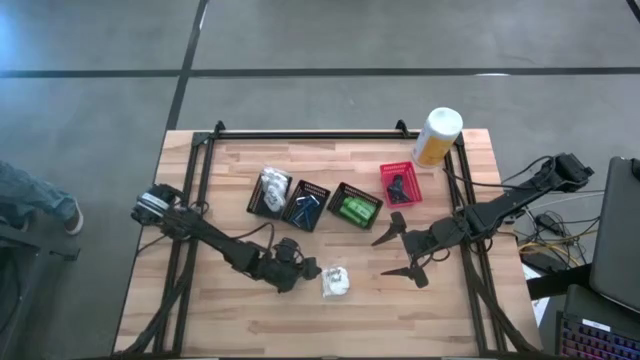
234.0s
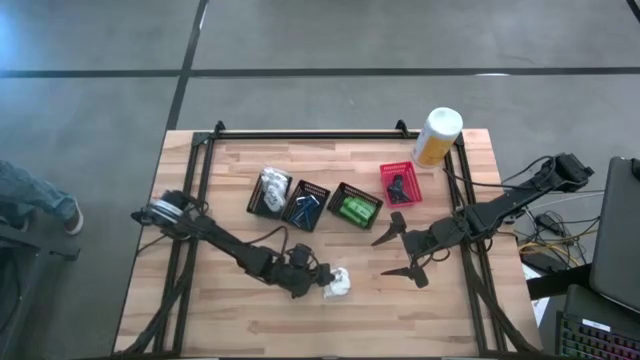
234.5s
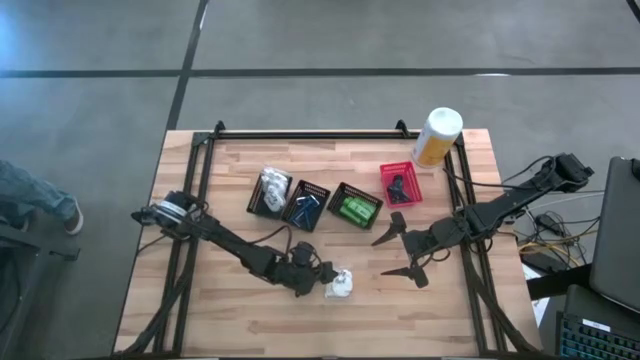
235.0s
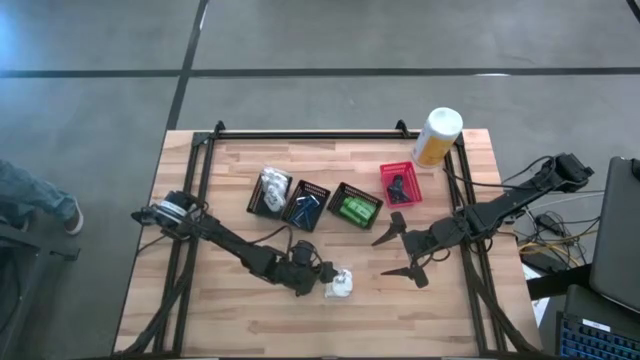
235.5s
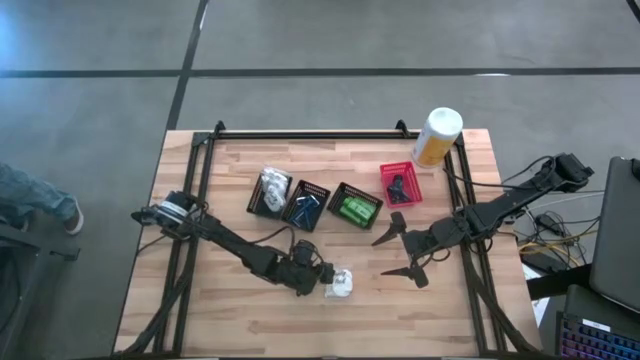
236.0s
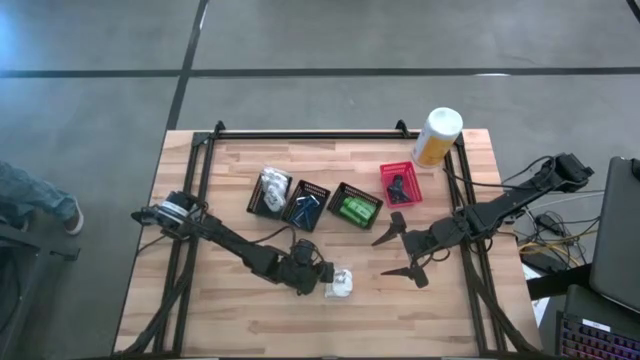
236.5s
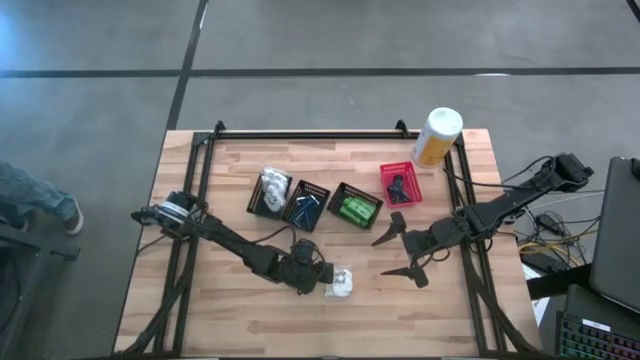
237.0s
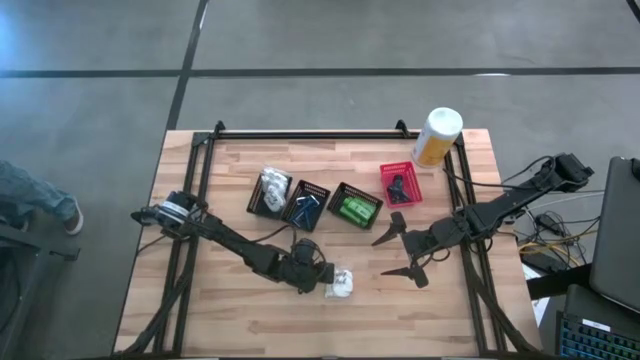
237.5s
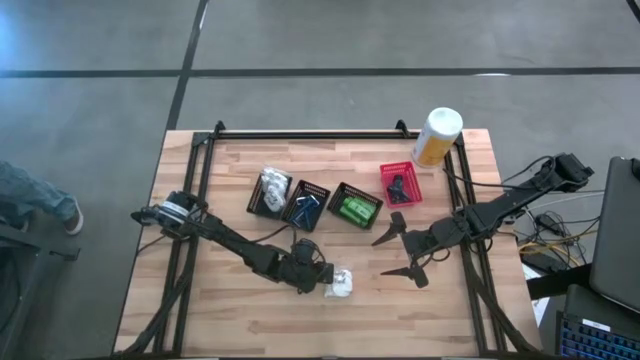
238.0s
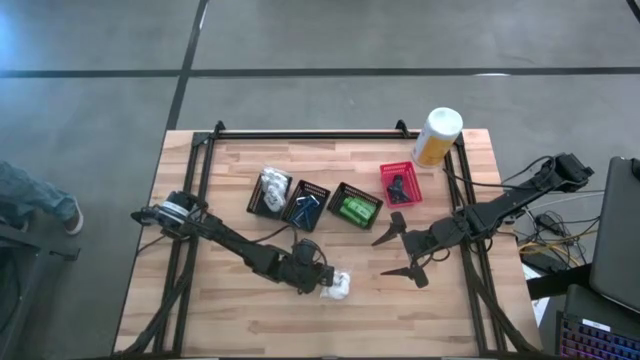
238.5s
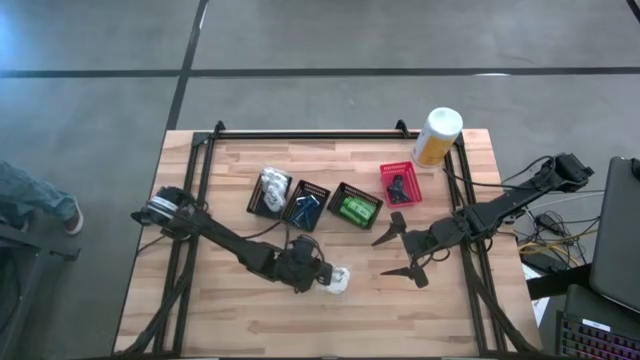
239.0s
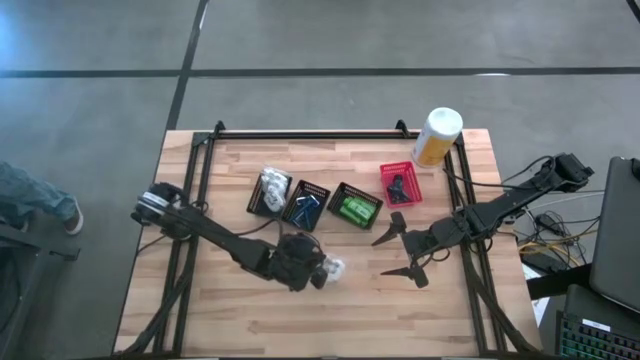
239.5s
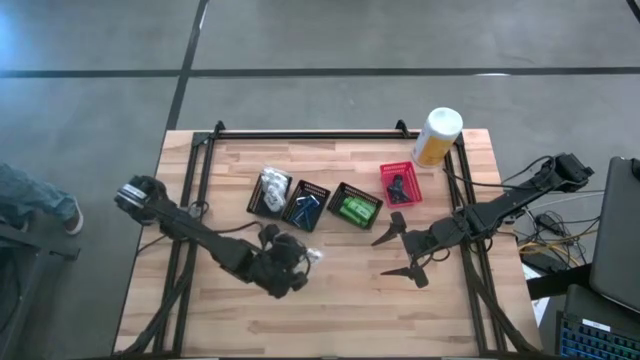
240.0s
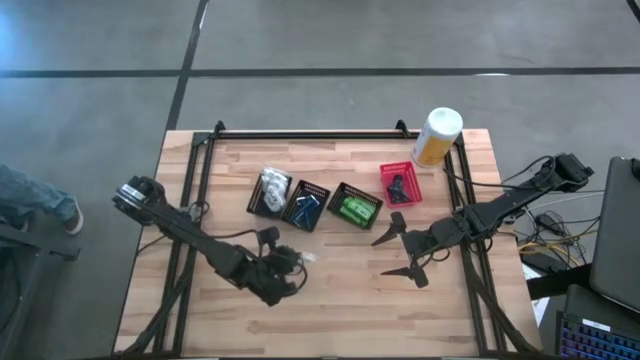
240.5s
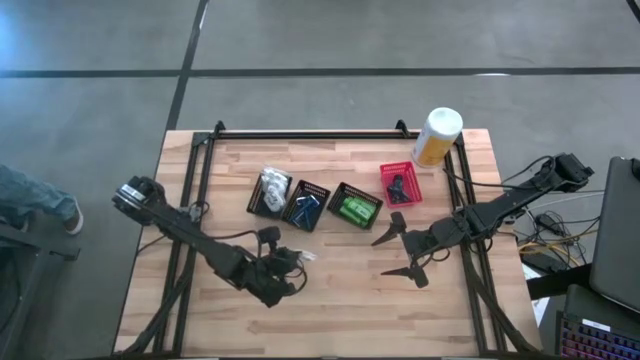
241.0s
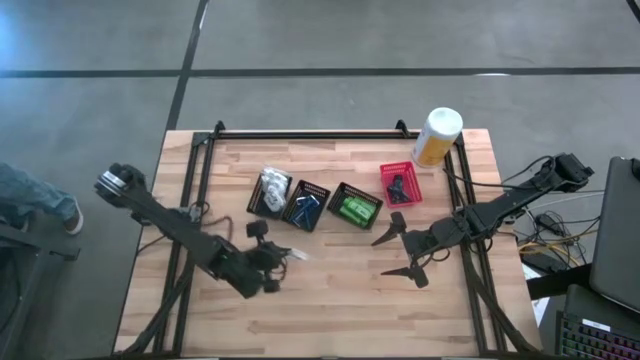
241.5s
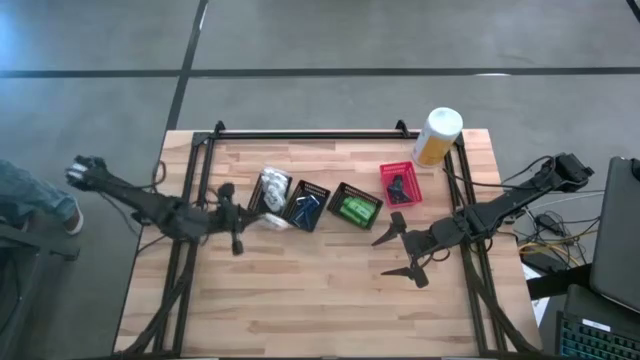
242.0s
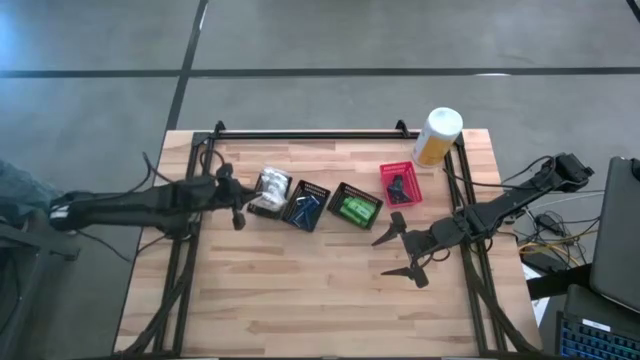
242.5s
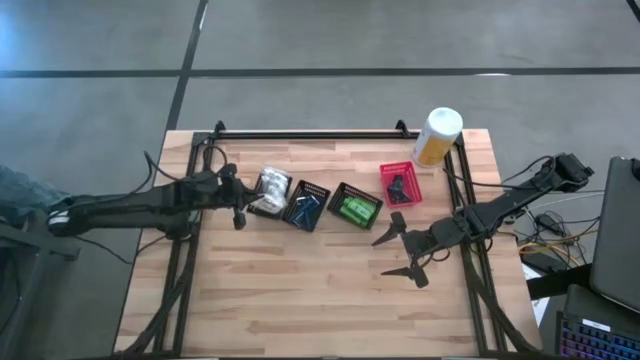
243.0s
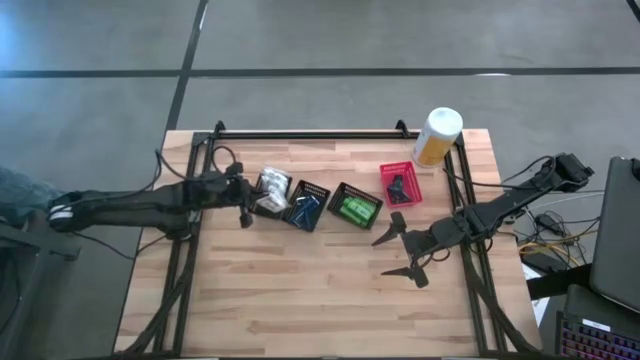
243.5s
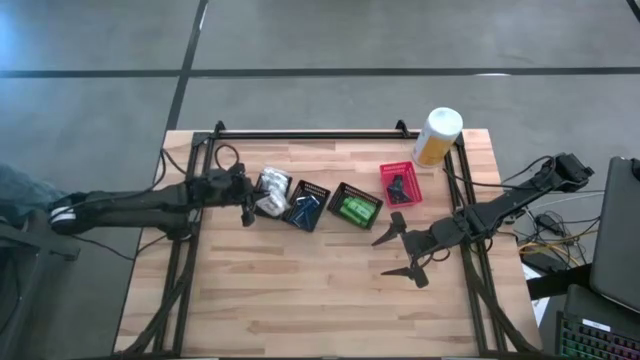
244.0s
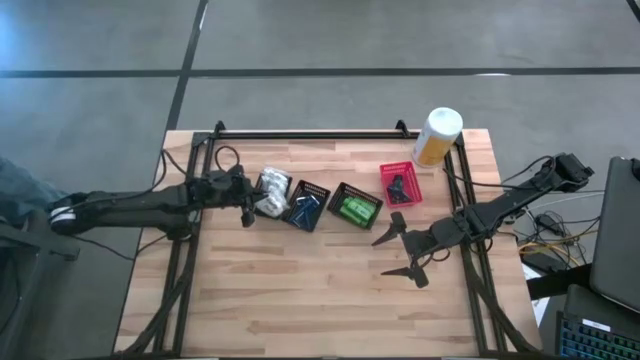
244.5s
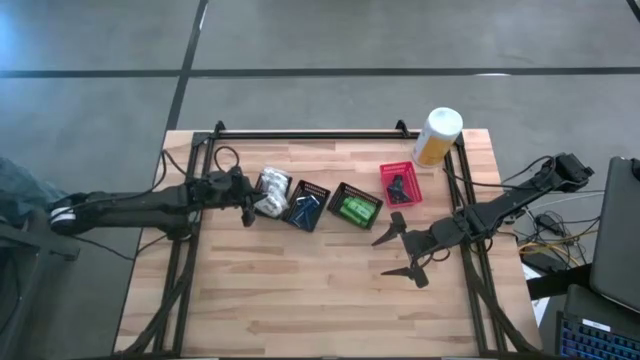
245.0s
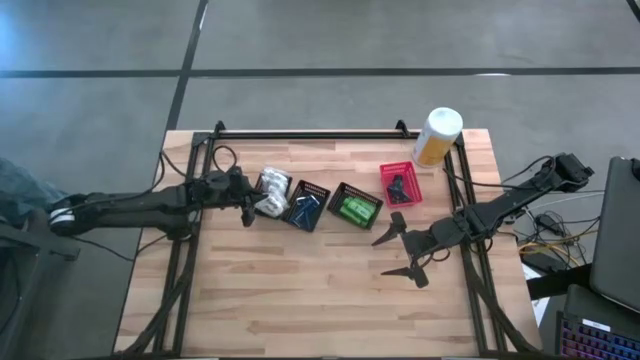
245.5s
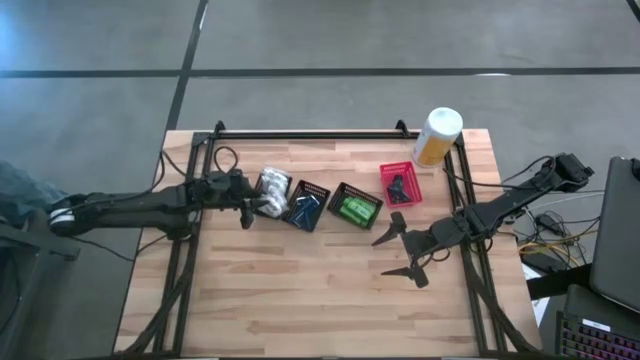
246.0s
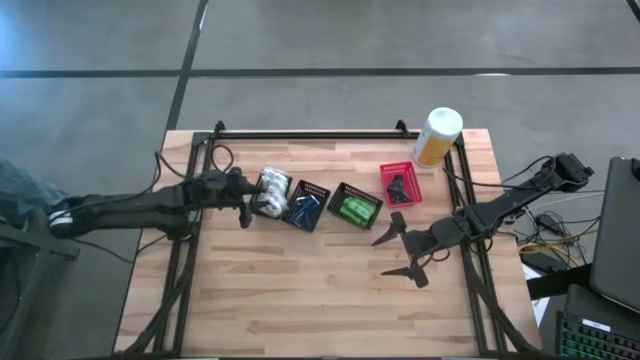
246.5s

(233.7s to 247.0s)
Task: Pick & Place Travel size toiletries
Put the vanity pack into the left black bin

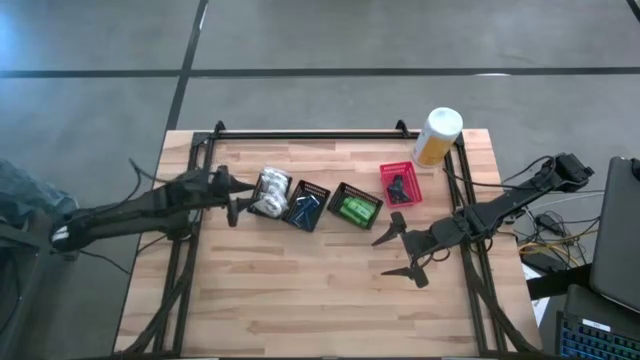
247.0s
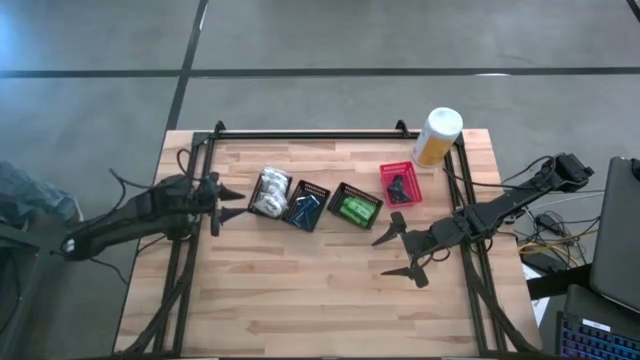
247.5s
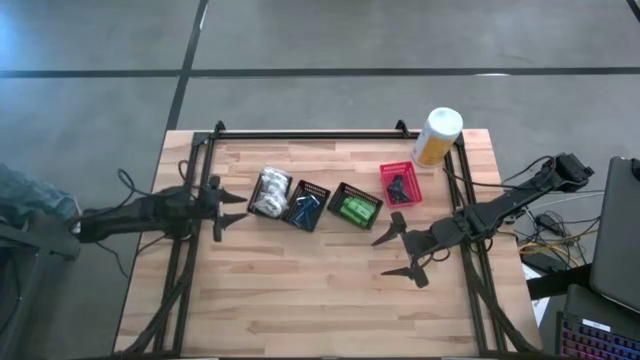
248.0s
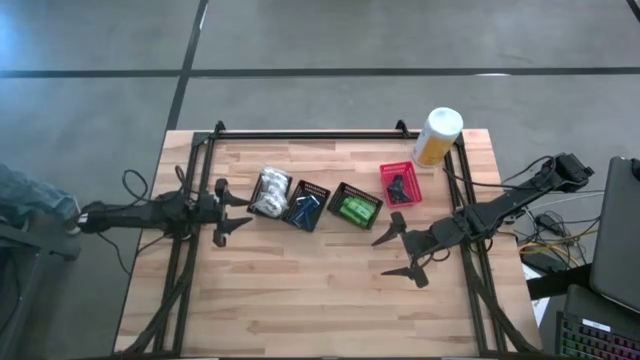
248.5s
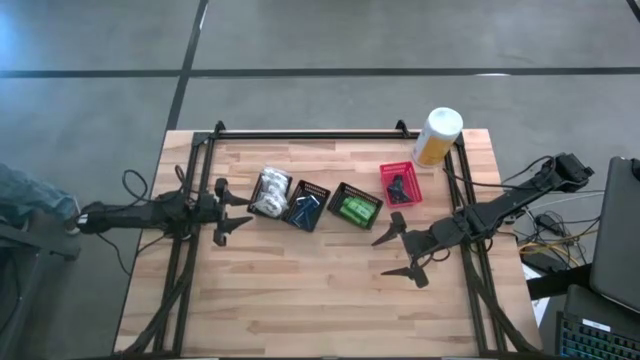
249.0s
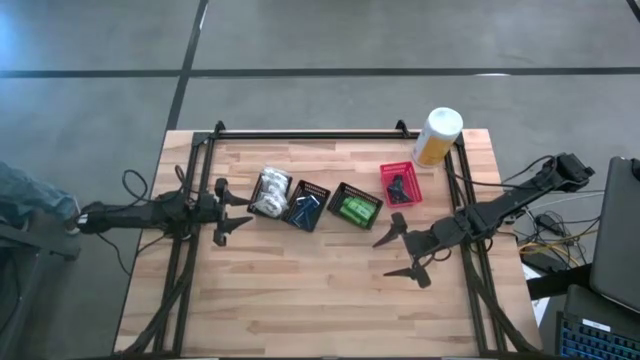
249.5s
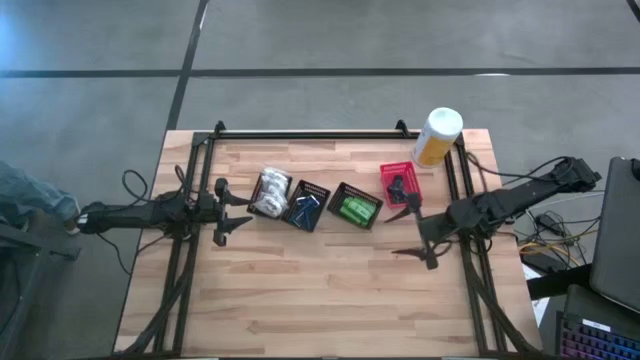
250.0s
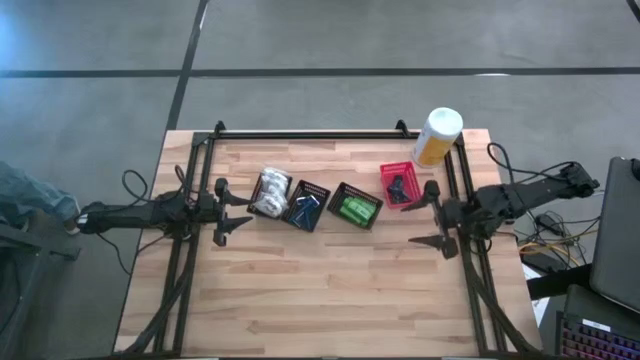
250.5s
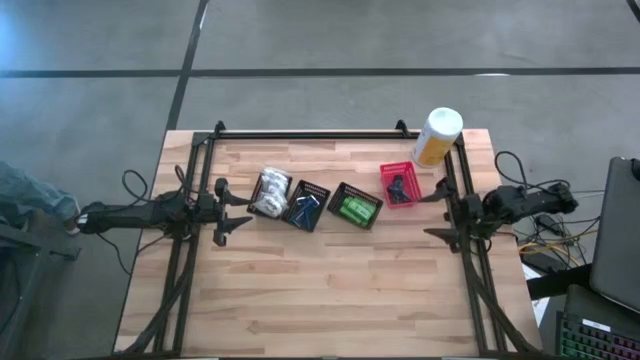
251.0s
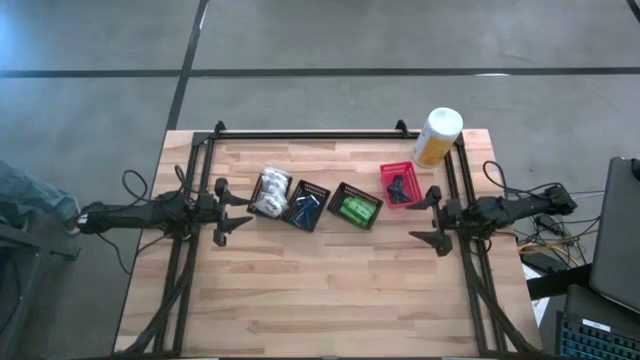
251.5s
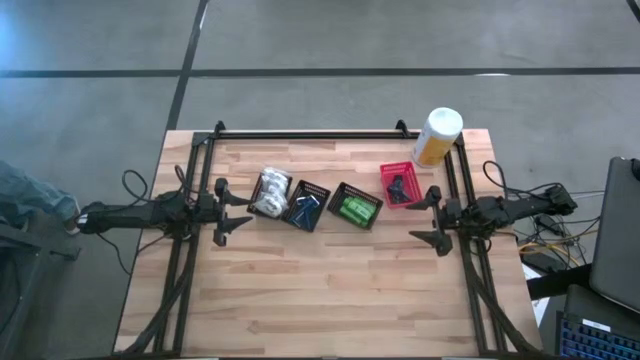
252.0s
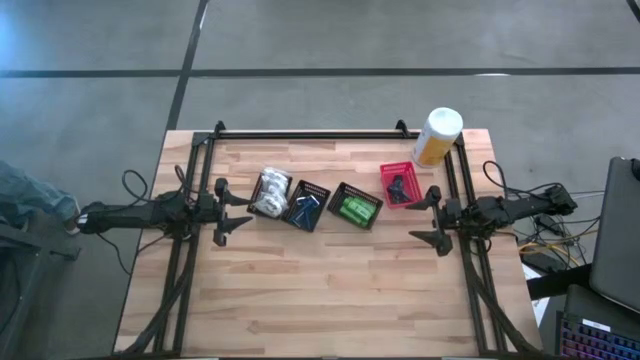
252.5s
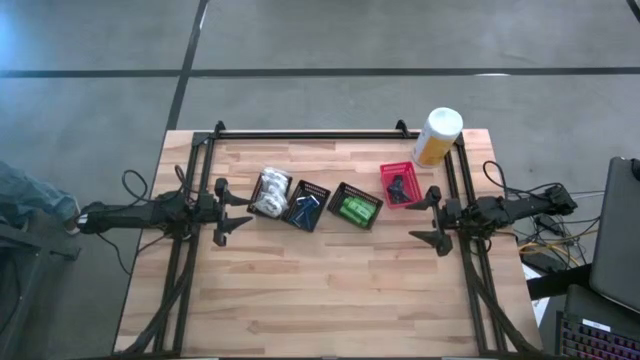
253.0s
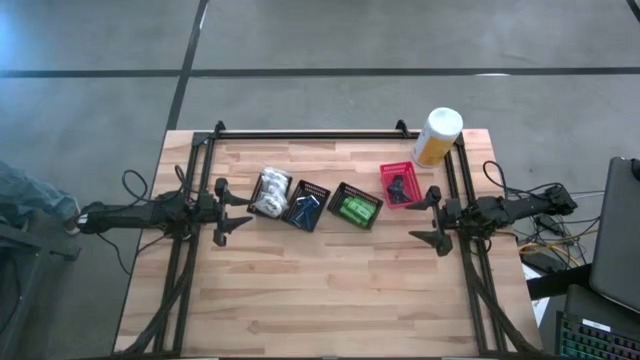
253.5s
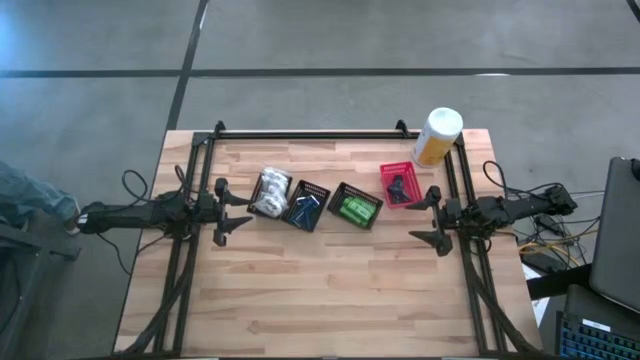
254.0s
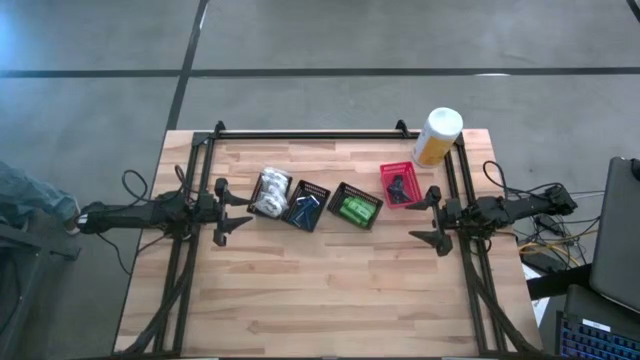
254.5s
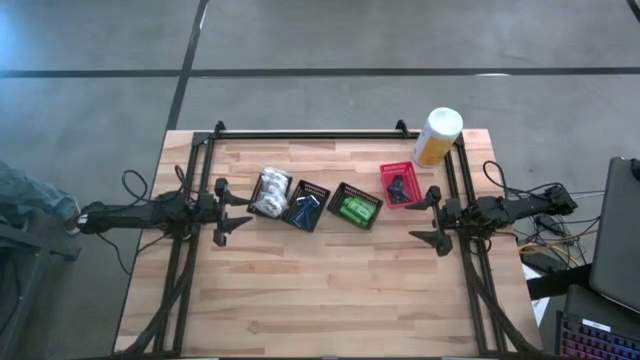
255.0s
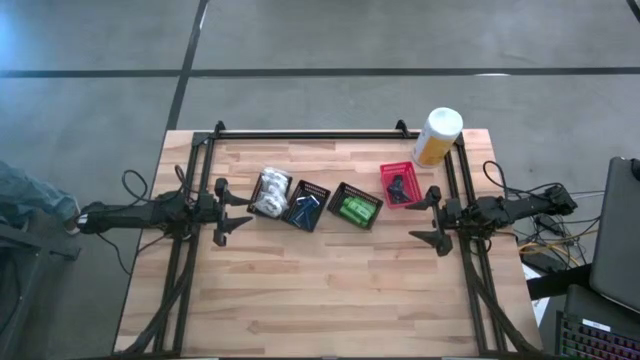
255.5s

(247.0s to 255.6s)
Return to Home Position
